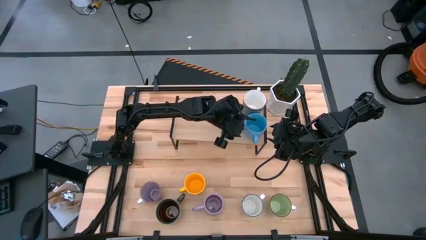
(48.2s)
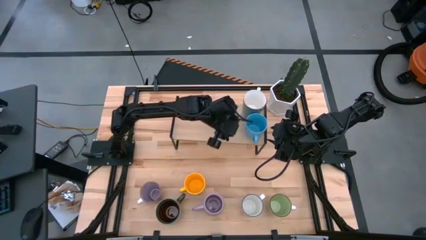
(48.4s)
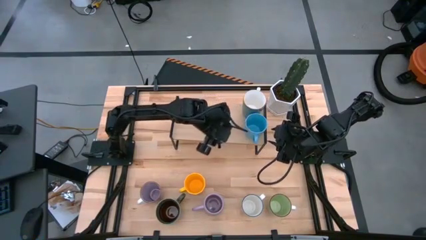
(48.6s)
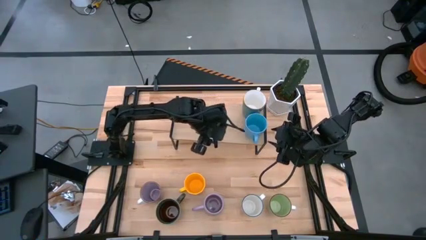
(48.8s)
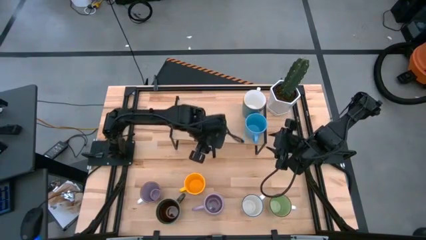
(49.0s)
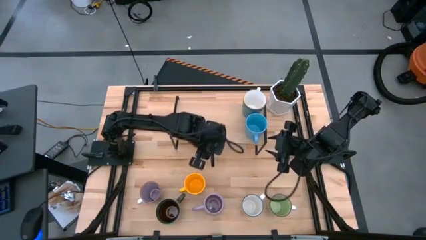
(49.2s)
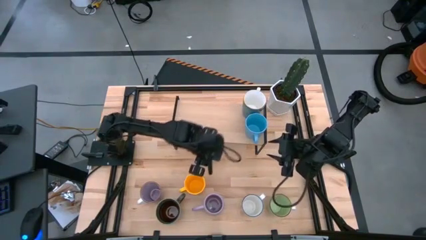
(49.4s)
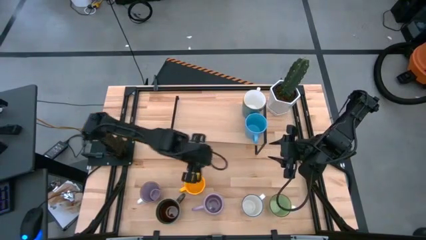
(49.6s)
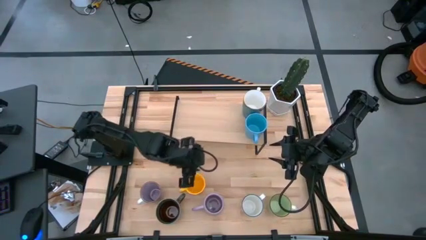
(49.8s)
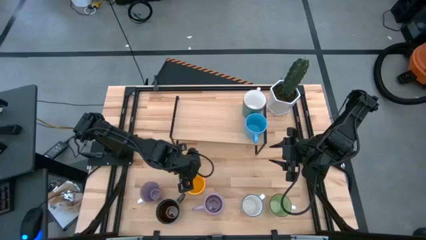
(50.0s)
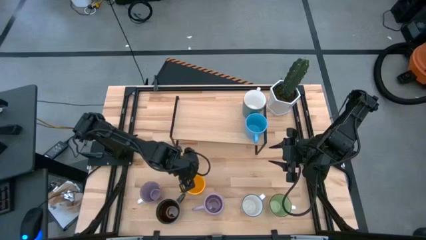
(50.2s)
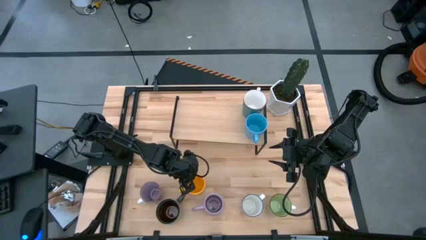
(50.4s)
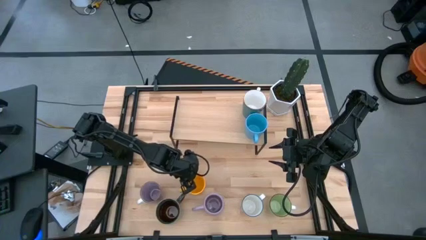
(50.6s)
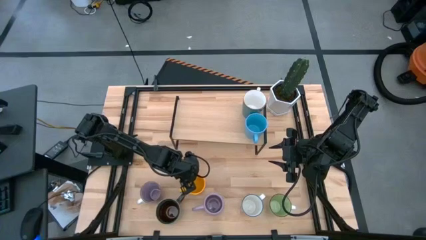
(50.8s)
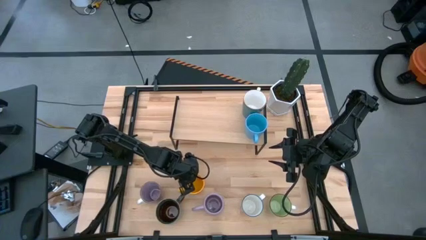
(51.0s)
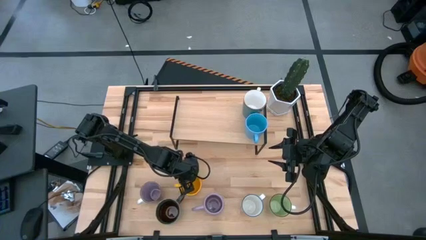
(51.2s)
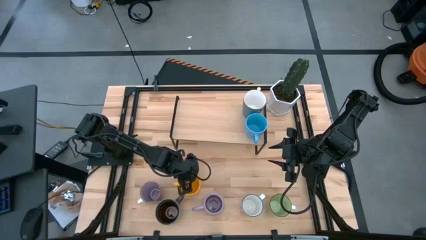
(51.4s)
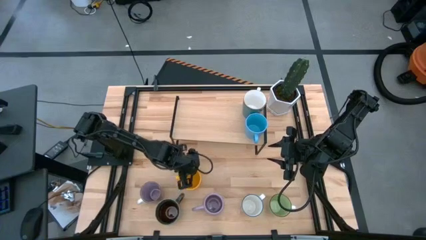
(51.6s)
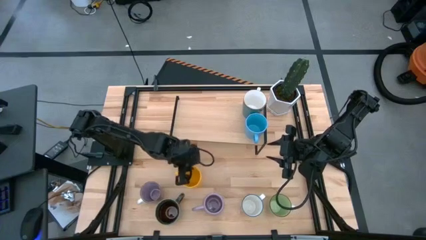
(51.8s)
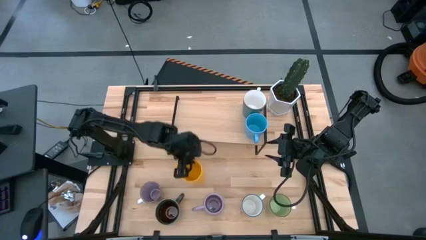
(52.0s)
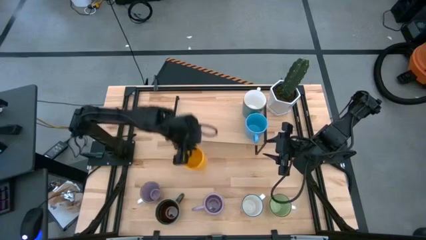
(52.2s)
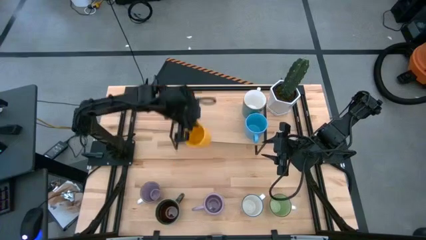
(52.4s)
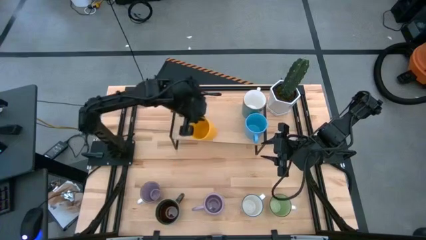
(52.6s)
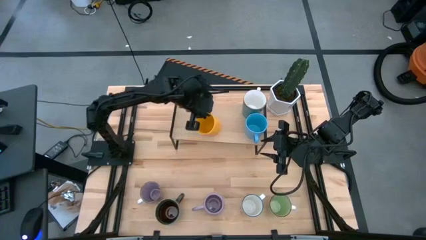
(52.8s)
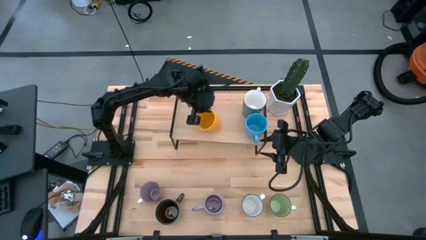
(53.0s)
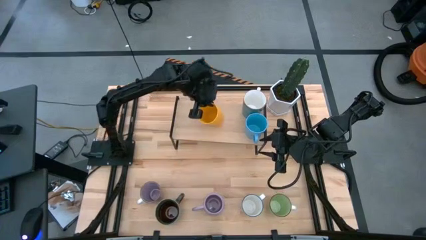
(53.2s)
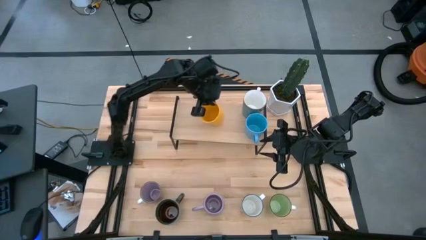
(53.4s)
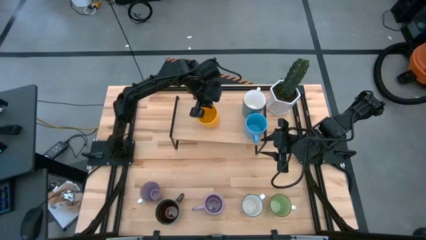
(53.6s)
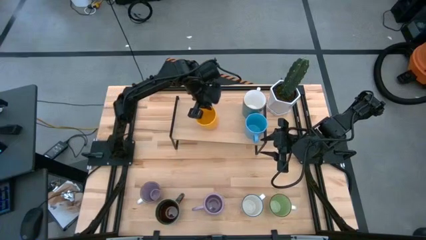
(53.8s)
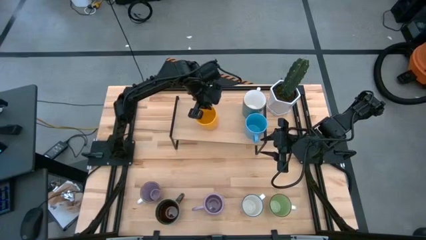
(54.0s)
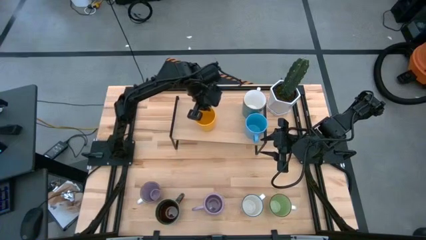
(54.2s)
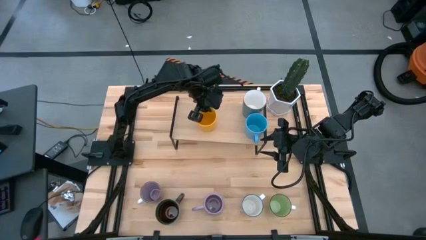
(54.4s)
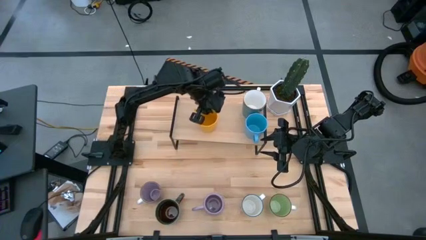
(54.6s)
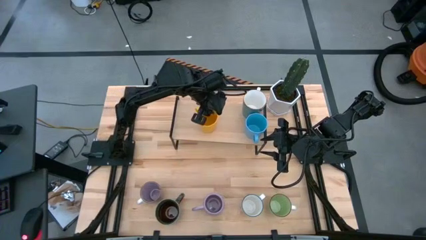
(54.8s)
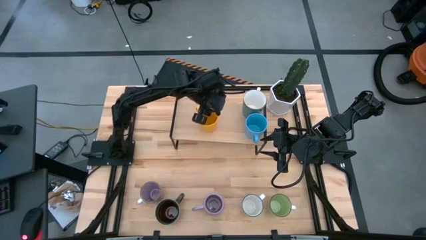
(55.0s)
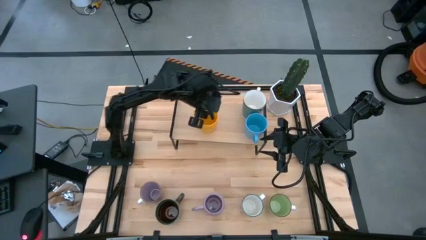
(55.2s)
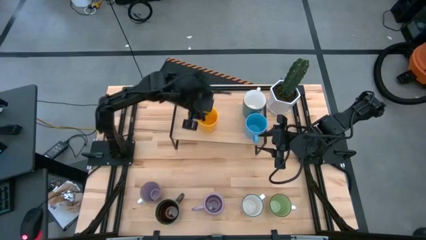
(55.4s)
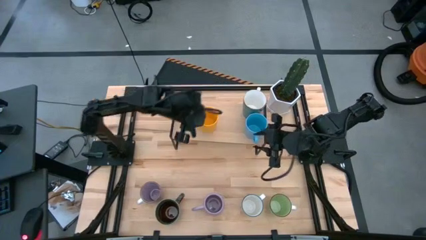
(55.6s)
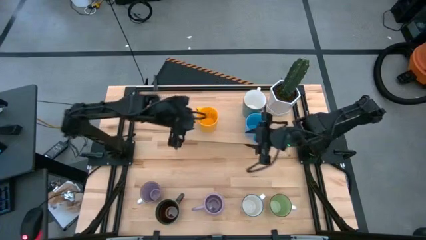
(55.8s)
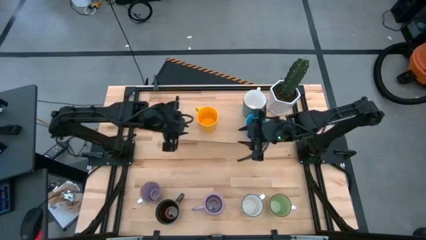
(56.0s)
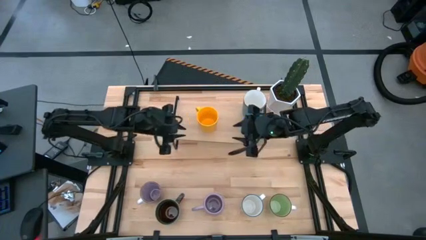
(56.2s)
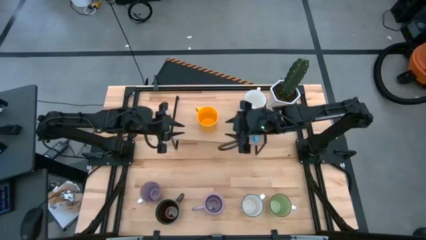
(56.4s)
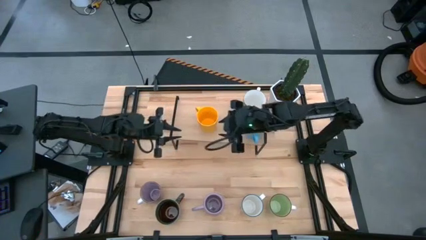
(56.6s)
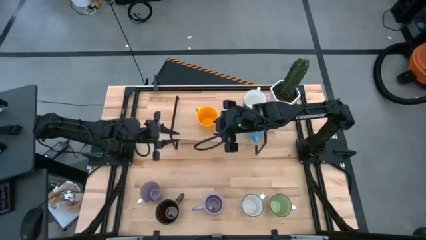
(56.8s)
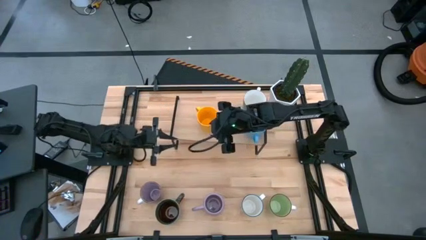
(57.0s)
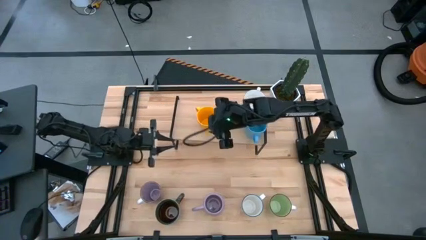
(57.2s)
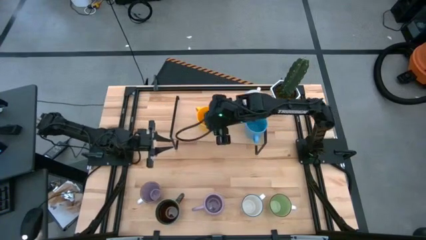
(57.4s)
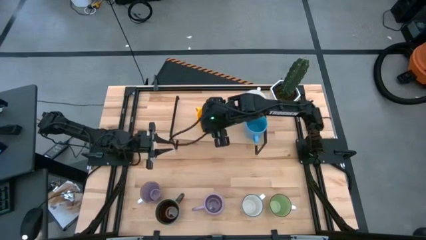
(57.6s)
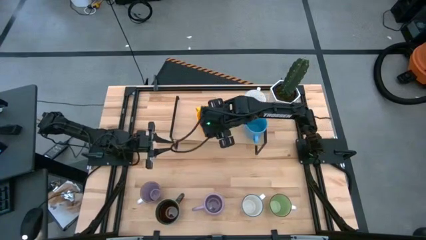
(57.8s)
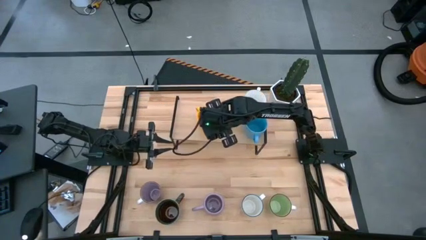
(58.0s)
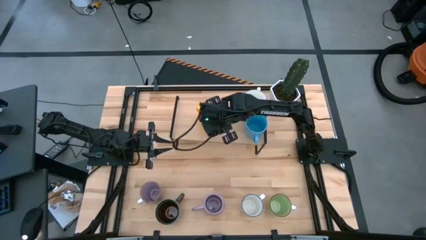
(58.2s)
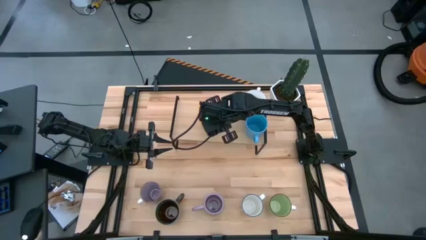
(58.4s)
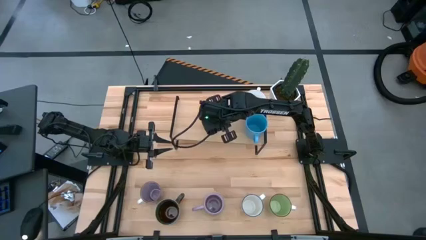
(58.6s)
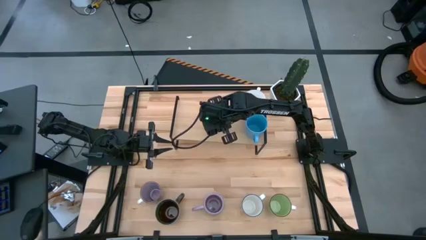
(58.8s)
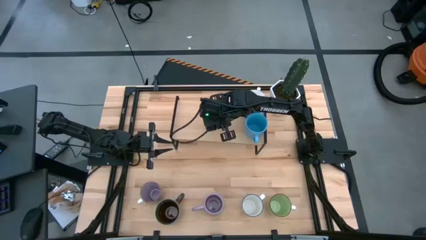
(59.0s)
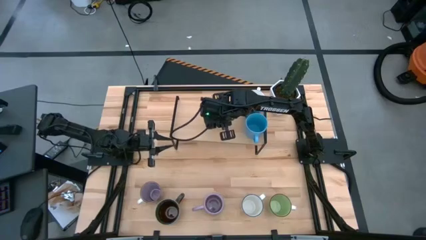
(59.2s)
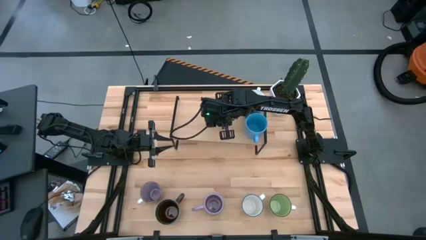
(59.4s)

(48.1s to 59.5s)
Task: Place coffee mugs
Put the yellow mug on the shelf
